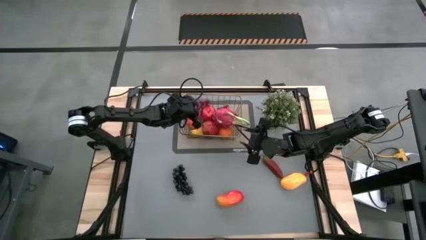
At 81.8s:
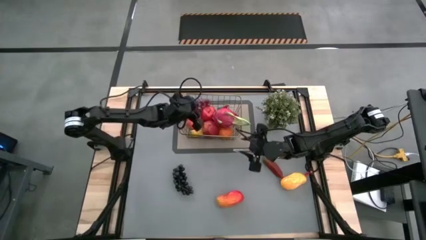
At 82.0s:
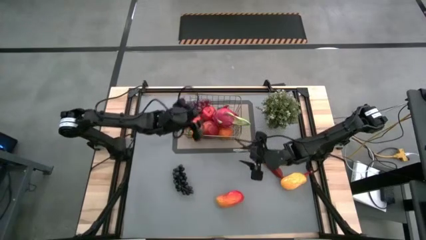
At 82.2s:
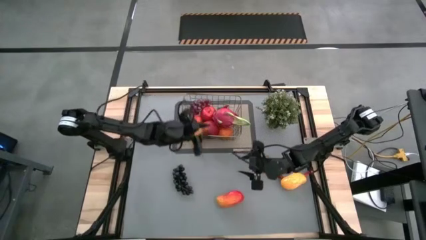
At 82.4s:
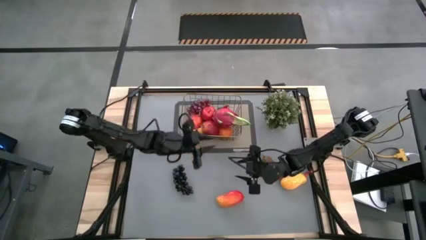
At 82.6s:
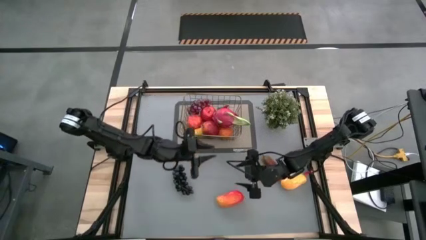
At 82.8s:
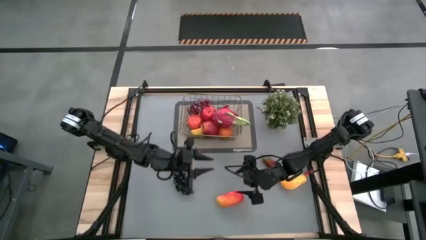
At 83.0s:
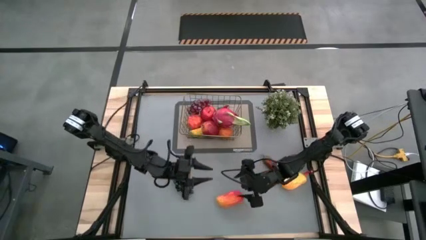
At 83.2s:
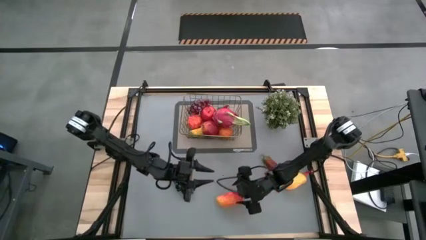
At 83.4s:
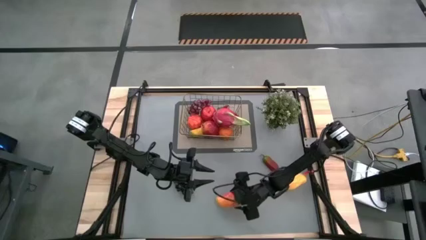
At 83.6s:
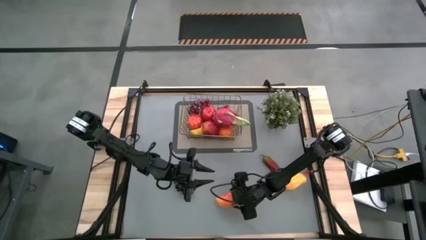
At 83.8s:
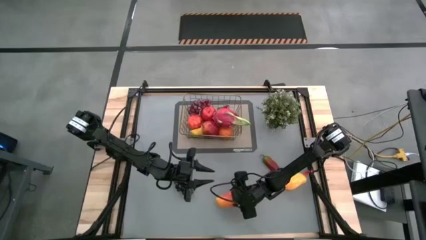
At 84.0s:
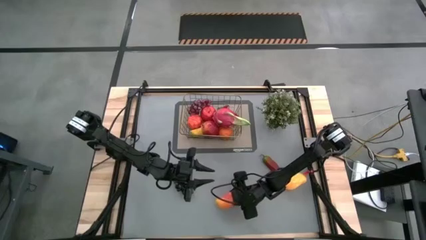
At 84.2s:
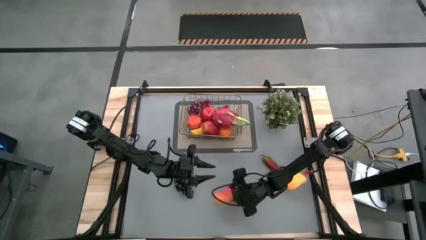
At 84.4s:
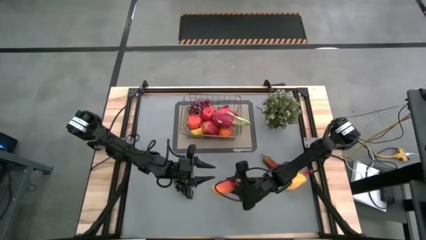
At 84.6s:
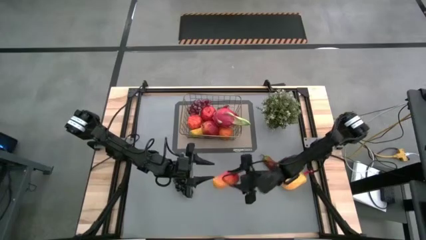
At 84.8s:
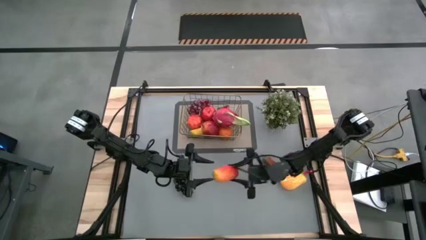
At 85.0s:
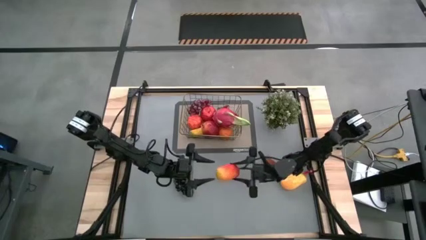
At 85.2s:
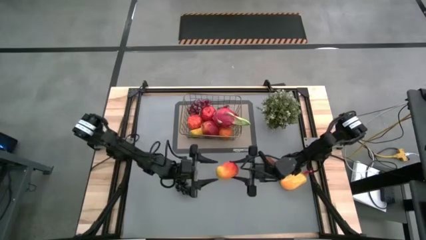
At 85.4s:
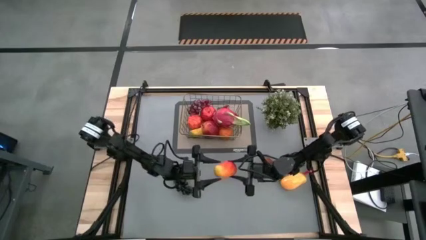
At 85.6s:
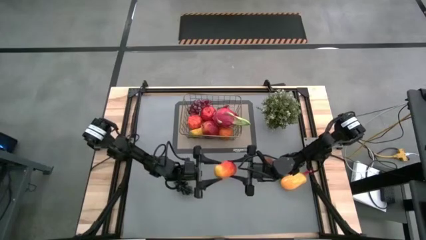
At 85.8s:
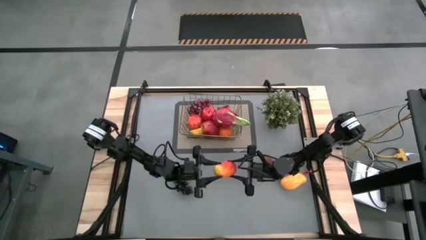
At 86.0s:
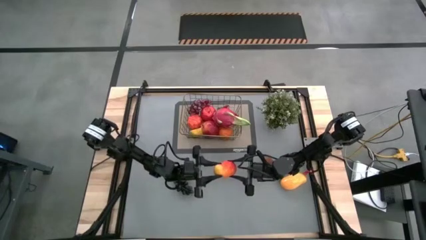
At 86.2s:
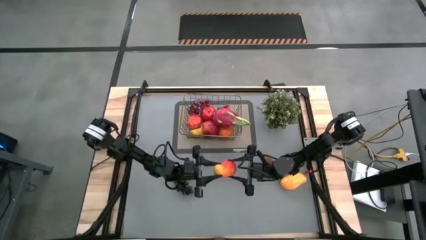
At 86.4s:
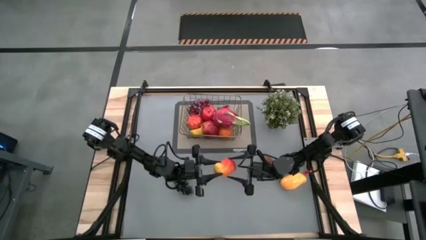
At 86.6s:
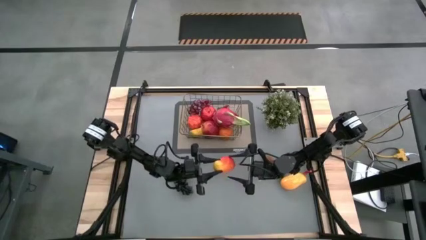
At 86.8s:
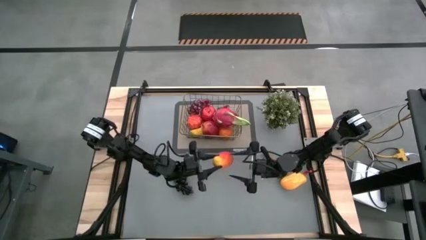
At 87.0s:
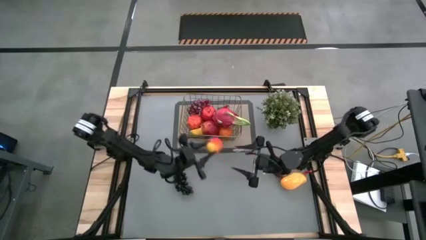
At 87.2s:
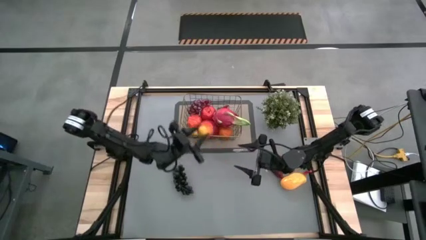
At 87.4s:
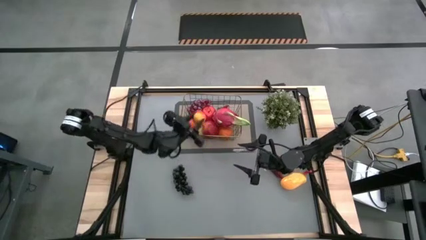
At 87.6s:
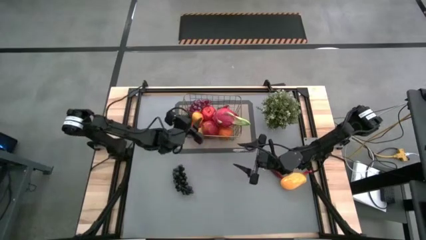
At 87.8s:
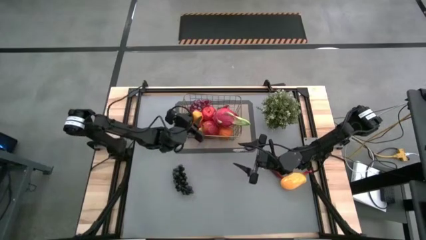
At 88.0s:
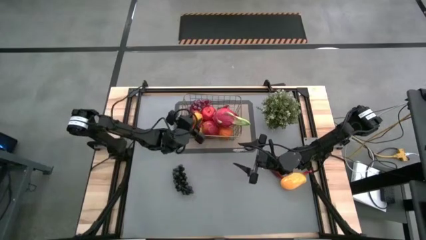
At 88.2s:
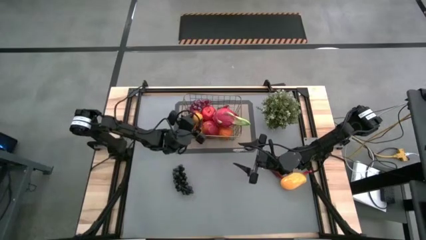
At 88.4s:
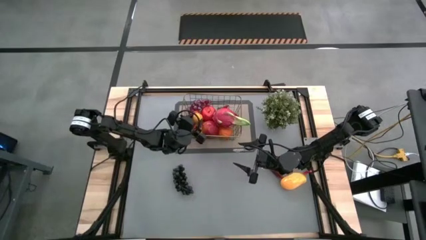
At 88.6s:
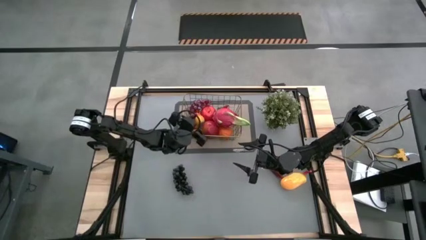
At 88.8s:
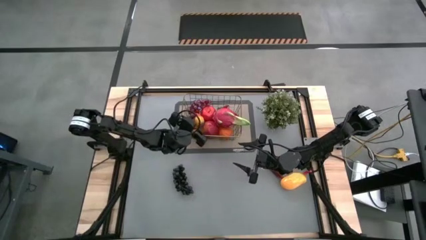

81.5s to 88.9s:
Task: Build produce basket
Put the orange mango into the wire basket

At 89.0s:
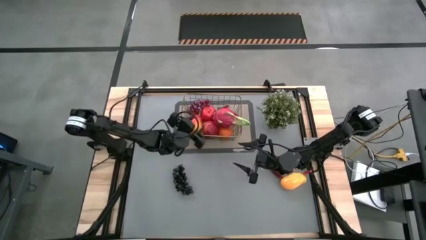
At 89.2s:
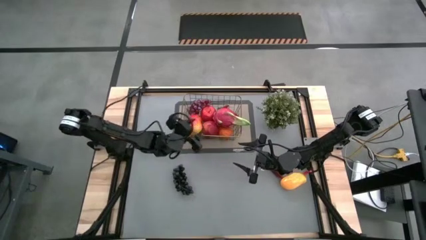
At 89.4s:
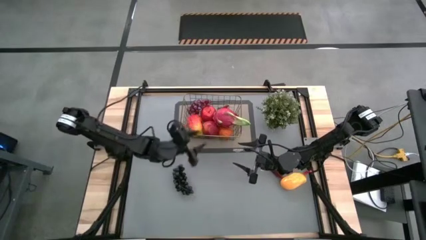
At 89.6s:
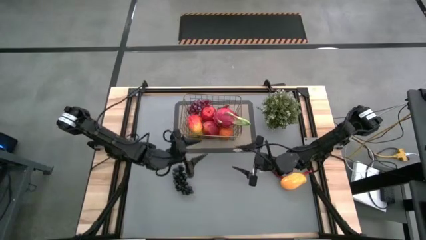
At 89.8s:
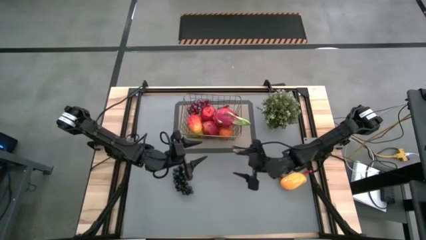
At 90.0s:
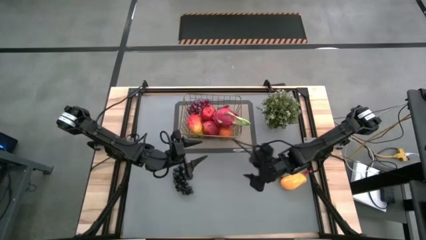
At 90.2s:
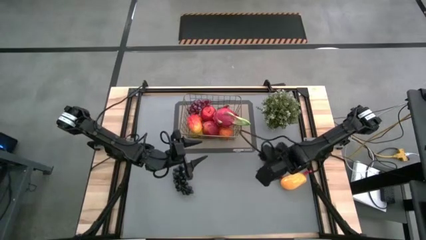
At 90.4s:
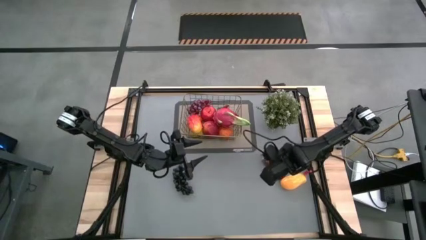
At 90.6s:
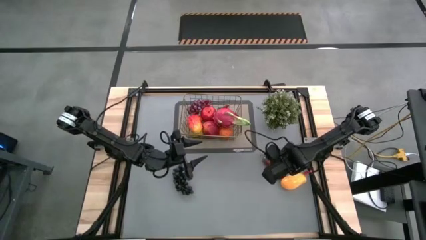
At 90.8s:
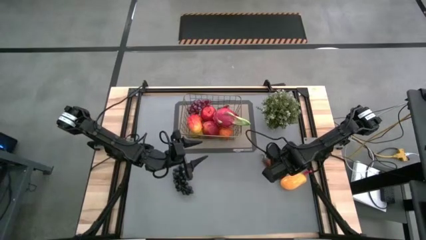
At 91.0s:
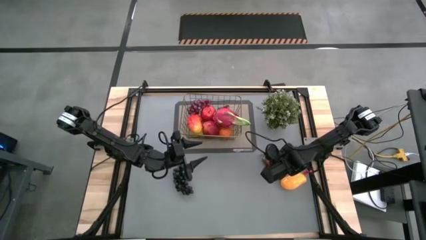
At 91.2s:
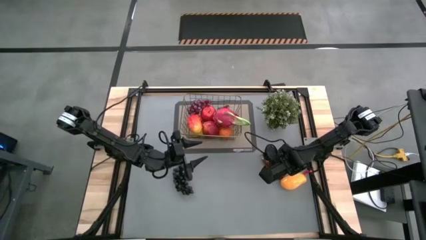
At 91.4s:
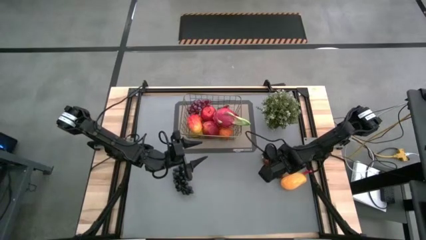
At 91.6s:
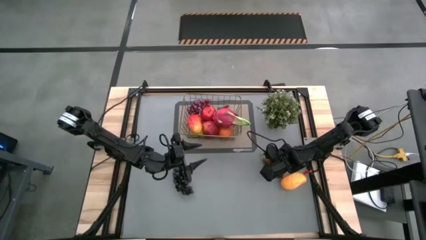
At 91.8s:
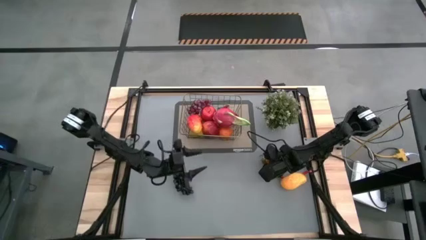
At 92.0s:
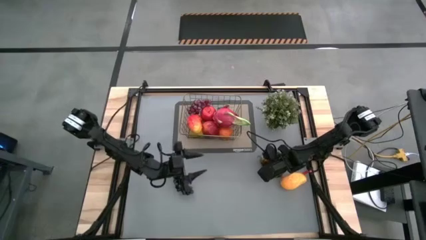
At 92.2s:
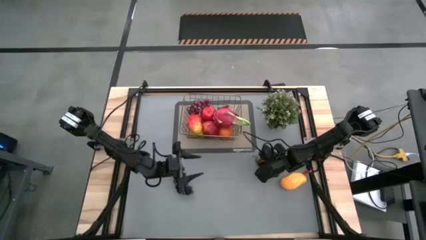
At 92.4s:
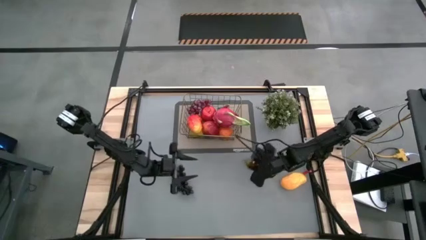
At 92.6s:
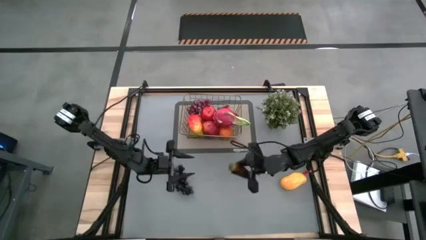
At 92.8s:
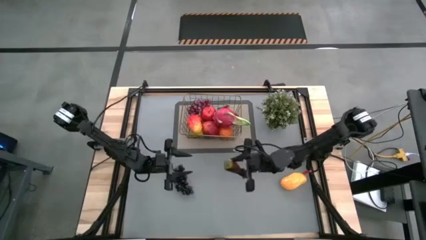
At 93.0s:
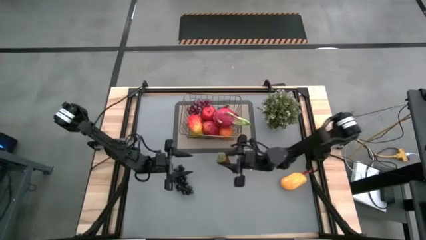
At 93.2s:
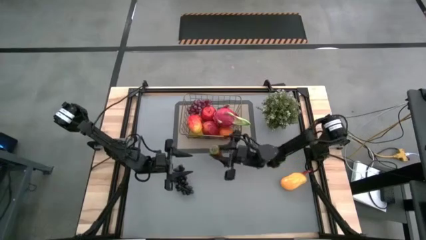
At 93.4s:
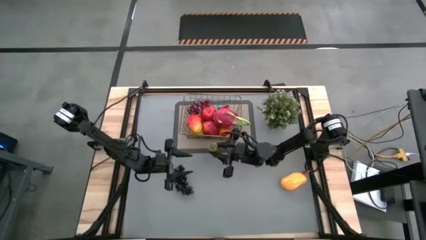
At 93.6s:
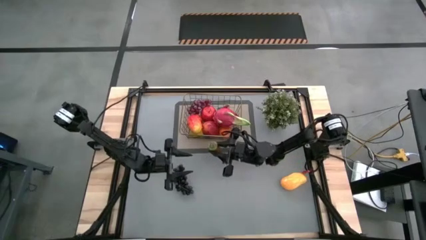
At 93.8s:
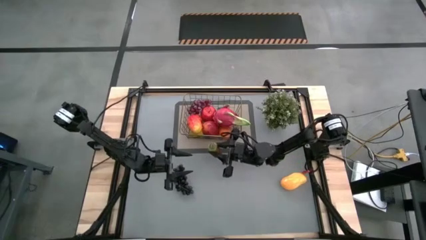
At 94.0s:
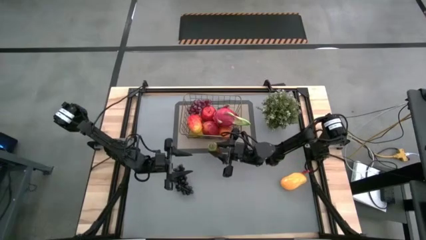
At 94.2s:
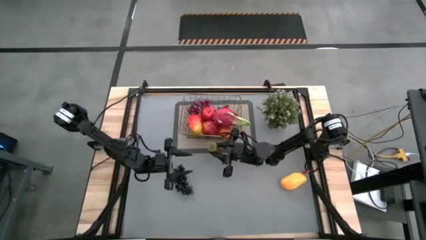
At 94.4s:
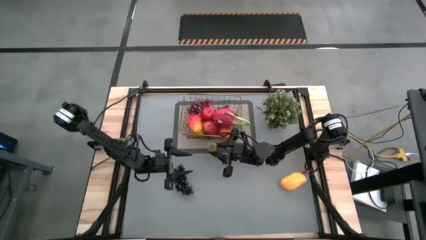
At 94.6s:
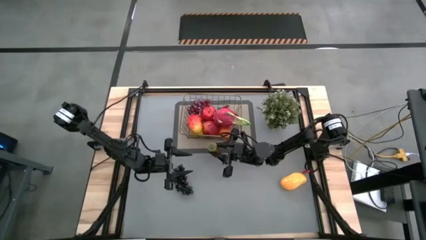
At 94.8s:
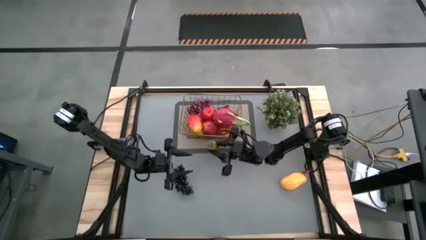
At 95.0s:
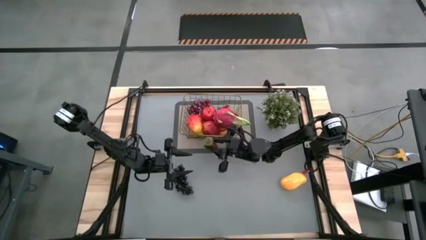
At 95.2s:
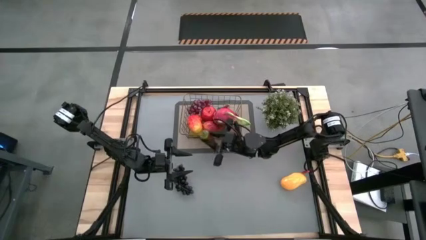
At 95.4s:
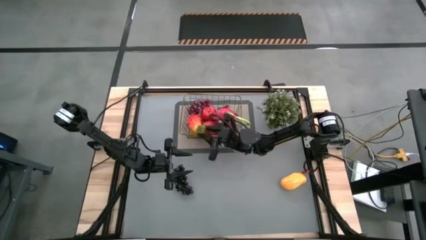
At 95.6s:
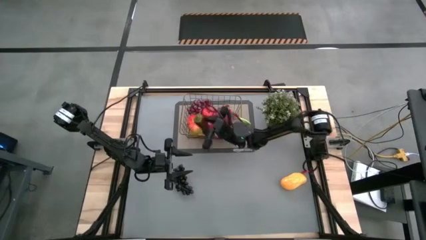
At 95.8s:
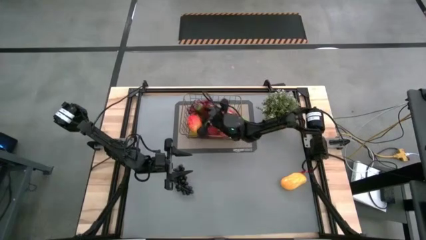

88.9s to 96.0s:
Put the chili pepper into the wire basket

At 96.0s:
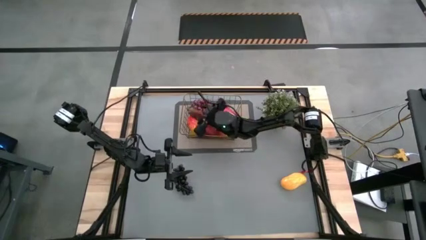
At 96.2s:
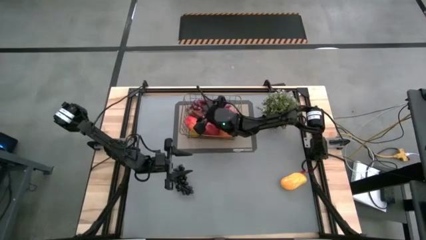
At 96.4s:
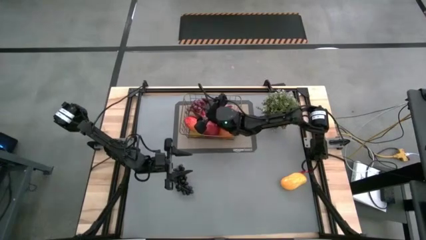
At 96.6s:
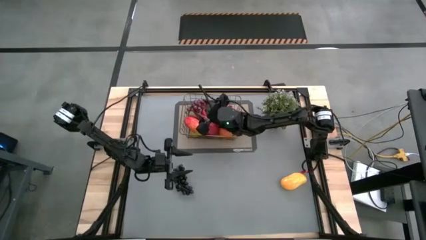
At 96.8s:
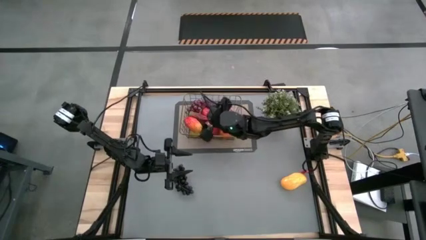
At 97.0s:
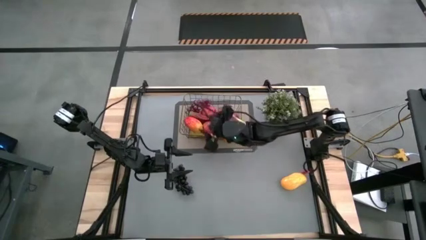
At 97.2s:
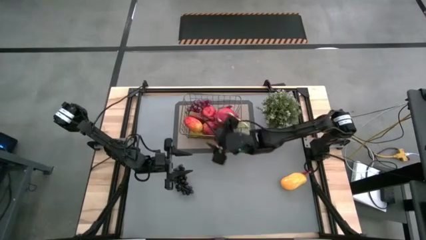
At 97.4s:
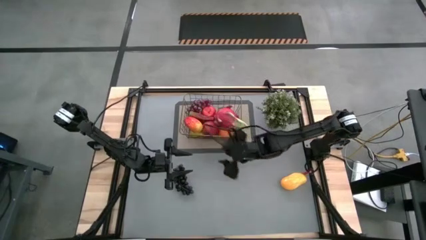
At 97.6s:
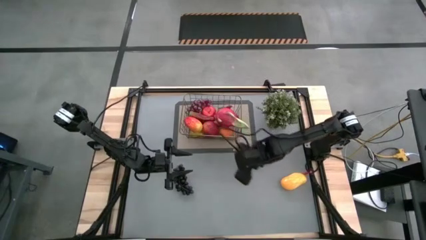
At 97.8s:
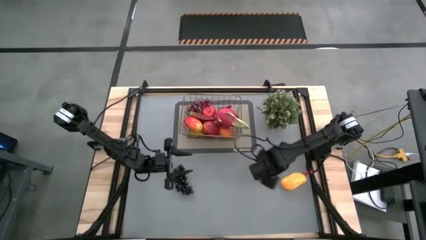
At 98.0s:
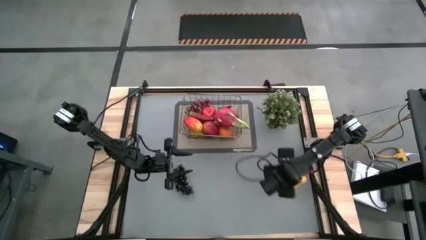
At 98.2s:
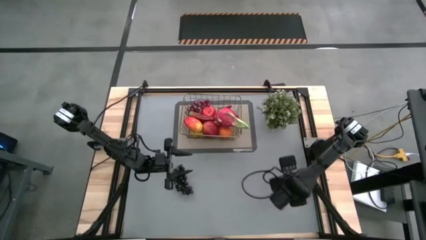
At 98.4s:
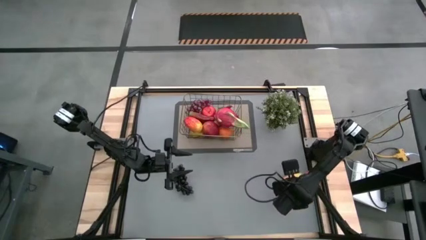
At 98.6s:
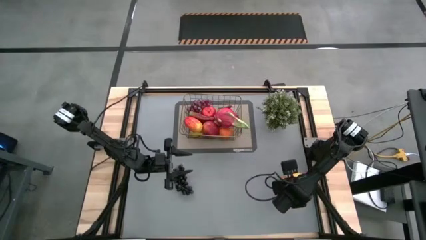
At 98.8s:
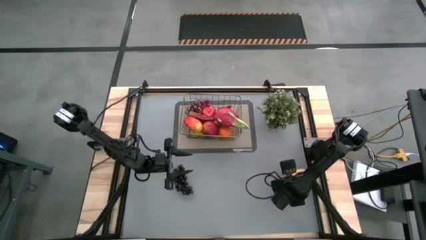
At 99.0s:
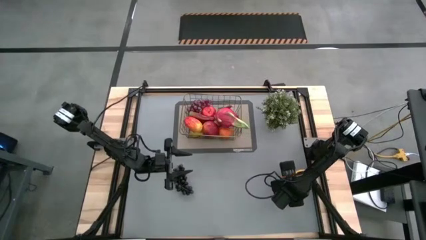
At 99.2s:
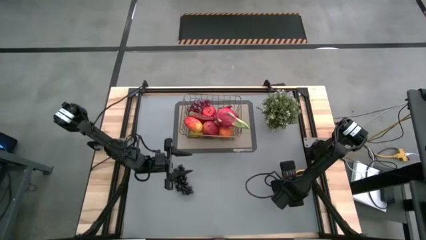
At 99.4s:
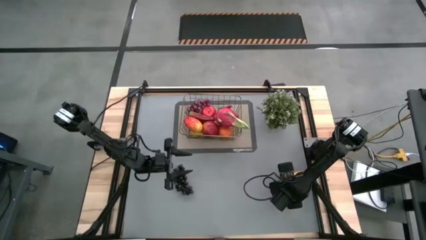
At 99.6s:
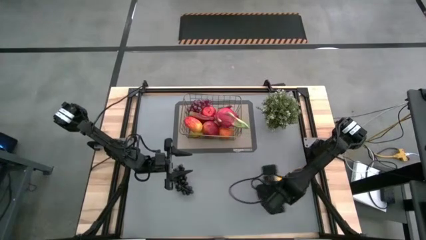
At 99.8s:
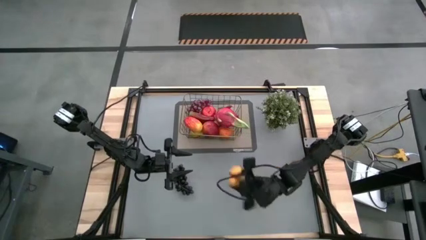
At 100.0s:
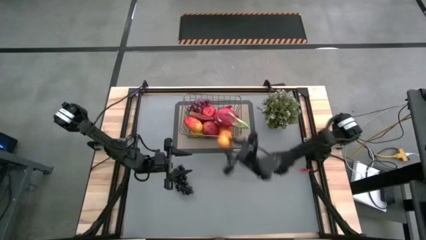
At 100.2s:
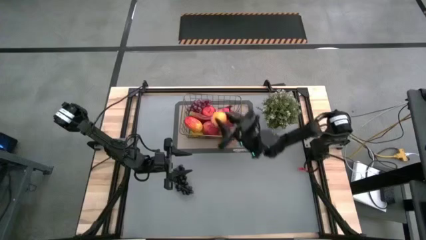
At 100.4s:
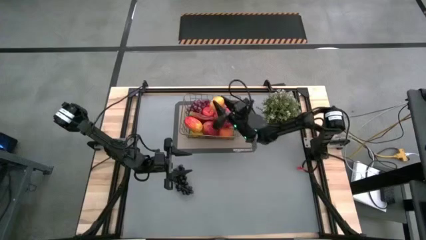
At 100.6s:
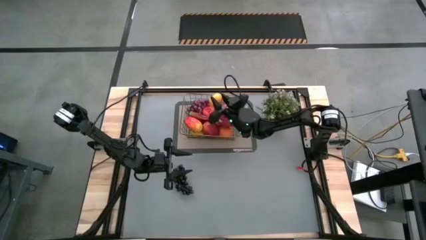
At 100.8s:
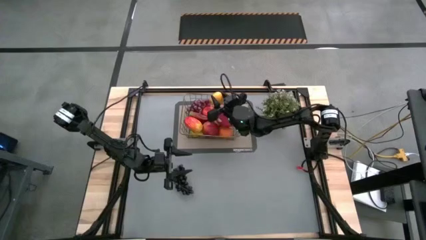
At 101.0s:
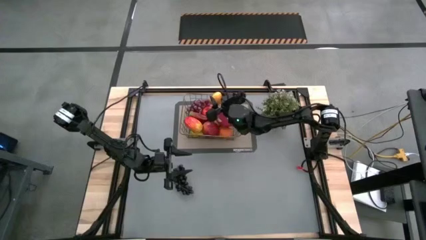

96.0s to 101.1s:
Put the mango into the wire basket
